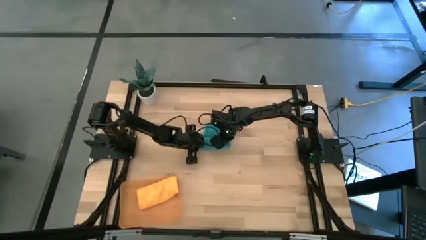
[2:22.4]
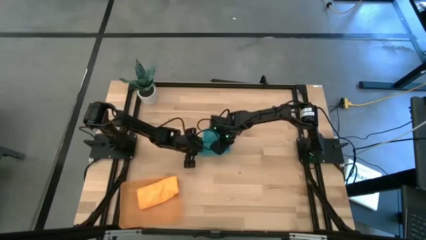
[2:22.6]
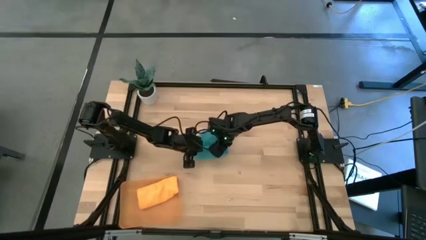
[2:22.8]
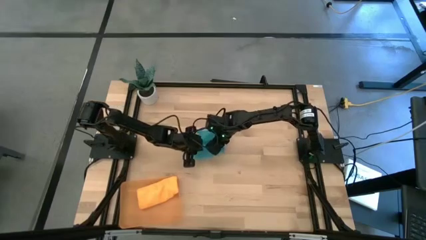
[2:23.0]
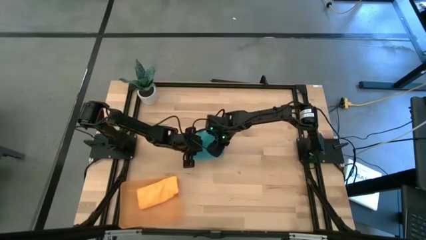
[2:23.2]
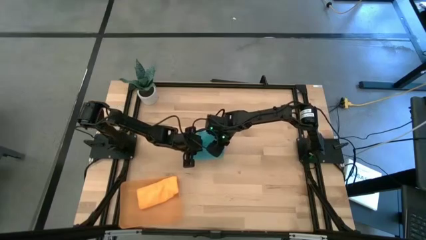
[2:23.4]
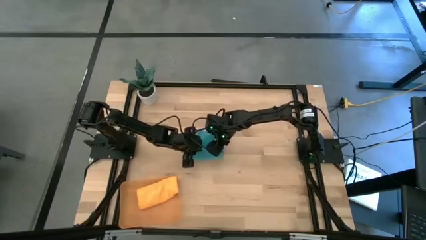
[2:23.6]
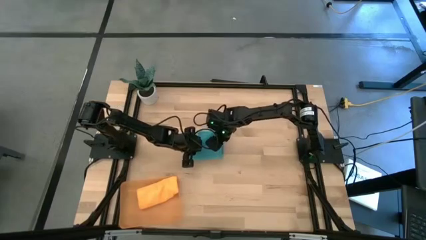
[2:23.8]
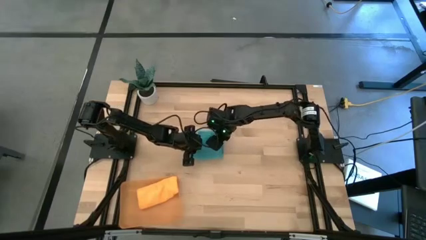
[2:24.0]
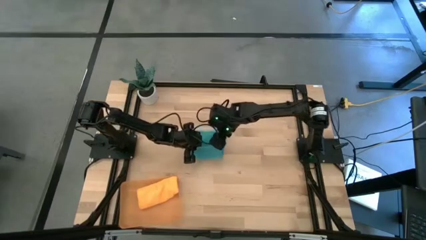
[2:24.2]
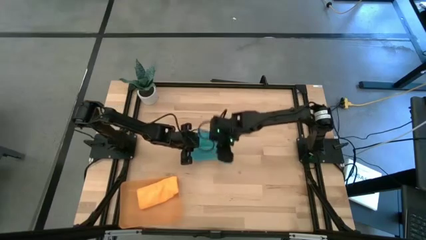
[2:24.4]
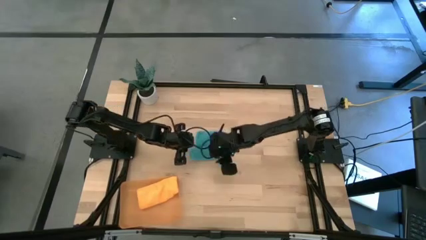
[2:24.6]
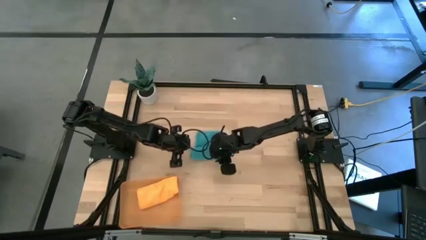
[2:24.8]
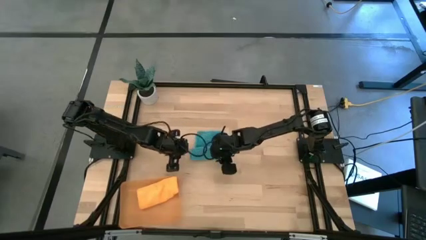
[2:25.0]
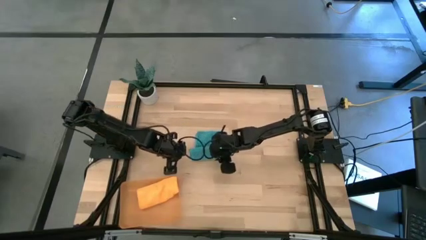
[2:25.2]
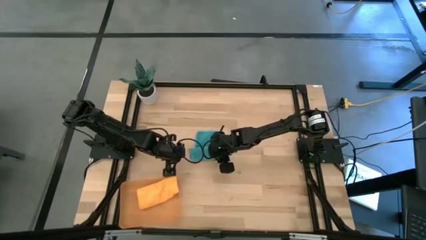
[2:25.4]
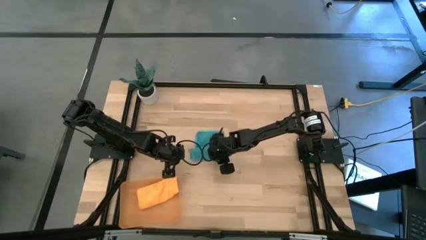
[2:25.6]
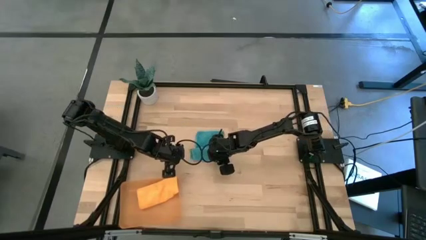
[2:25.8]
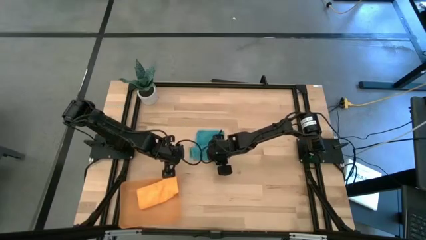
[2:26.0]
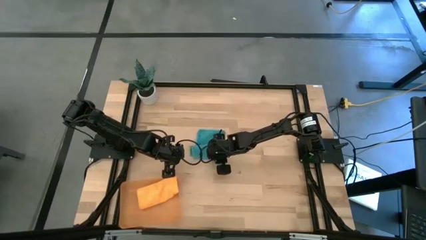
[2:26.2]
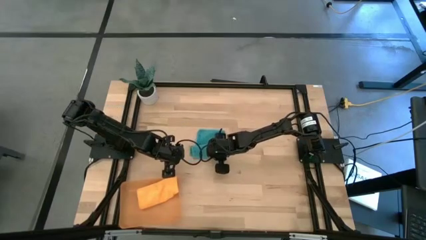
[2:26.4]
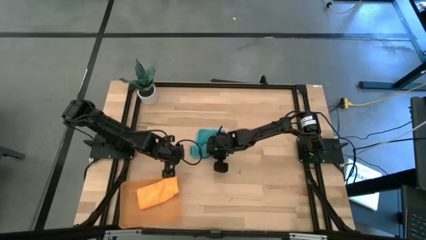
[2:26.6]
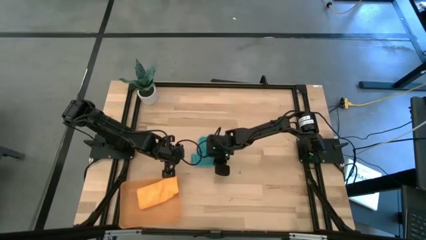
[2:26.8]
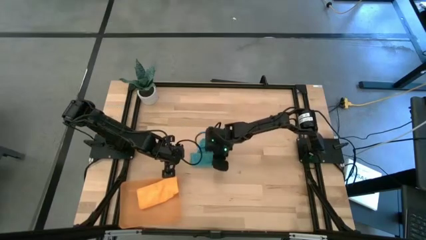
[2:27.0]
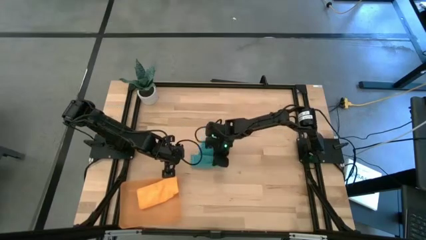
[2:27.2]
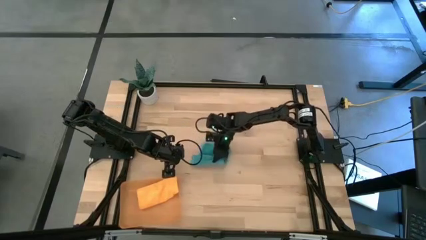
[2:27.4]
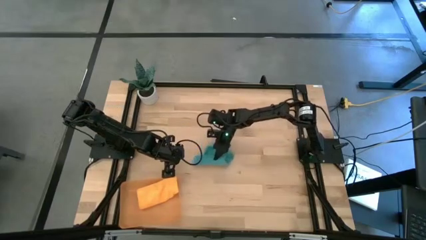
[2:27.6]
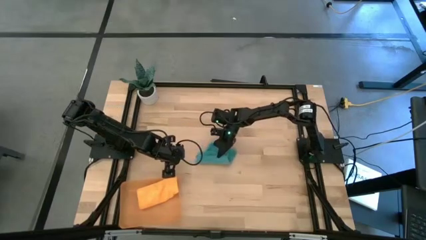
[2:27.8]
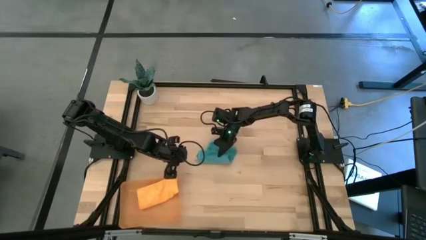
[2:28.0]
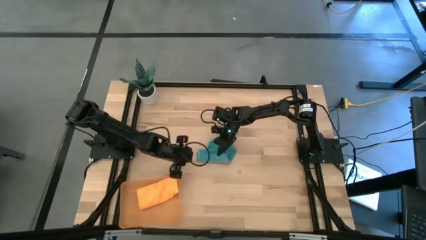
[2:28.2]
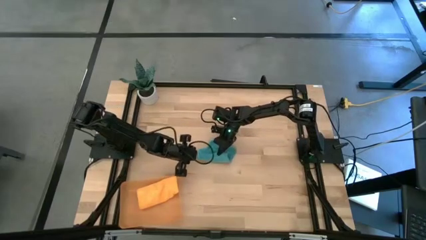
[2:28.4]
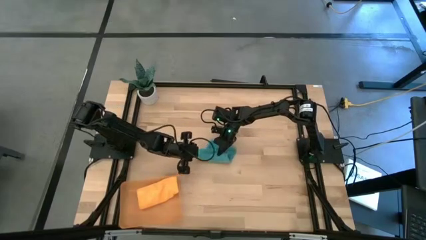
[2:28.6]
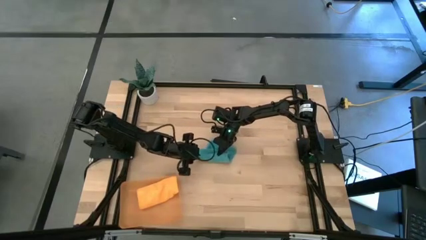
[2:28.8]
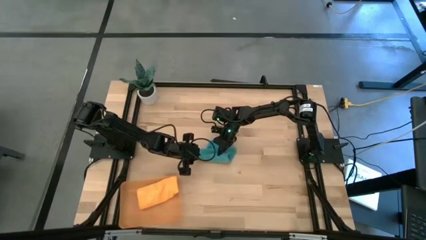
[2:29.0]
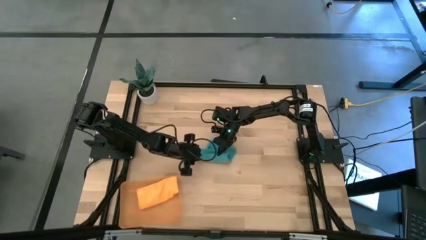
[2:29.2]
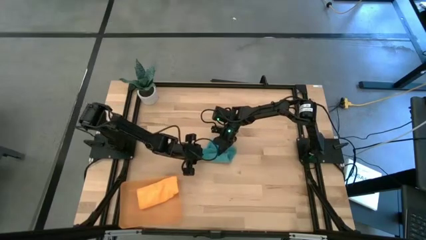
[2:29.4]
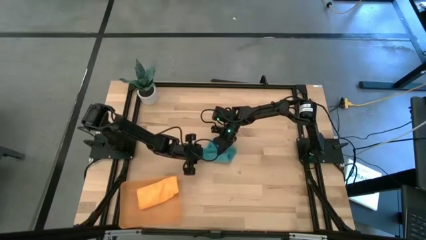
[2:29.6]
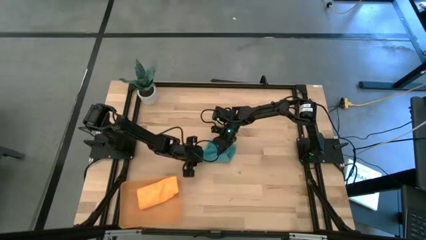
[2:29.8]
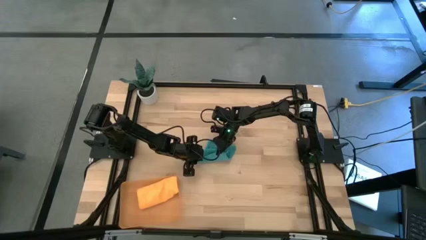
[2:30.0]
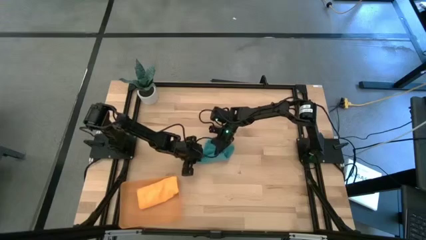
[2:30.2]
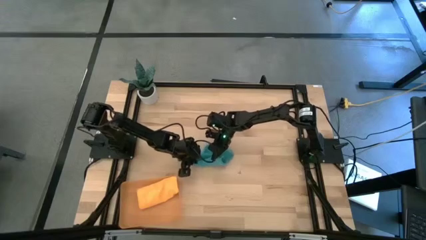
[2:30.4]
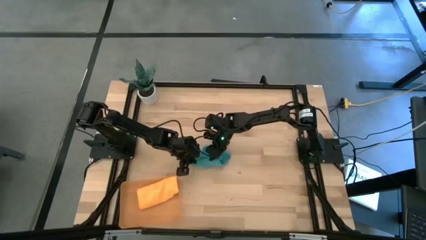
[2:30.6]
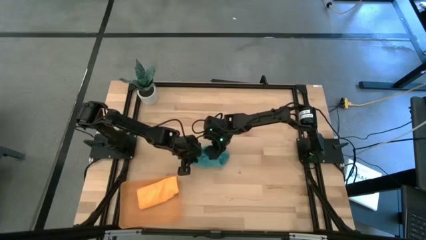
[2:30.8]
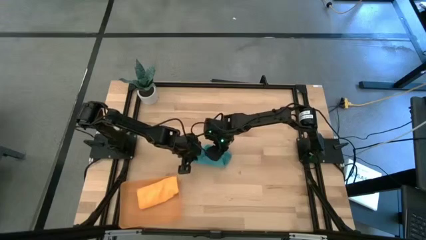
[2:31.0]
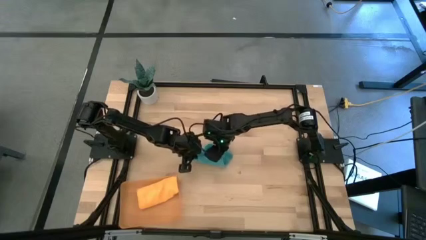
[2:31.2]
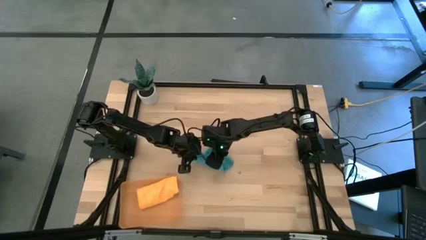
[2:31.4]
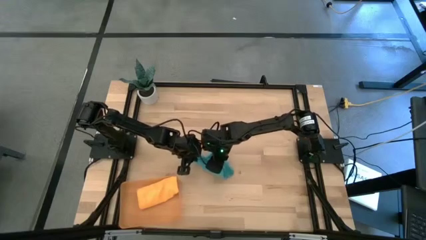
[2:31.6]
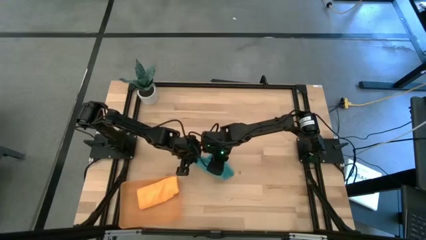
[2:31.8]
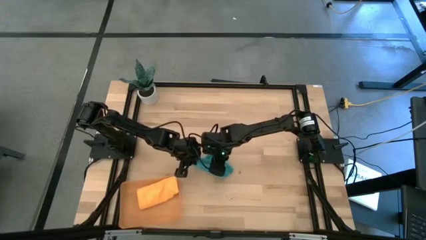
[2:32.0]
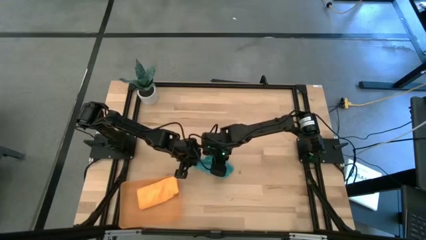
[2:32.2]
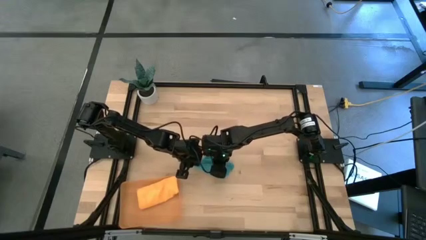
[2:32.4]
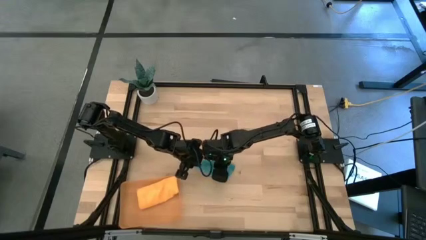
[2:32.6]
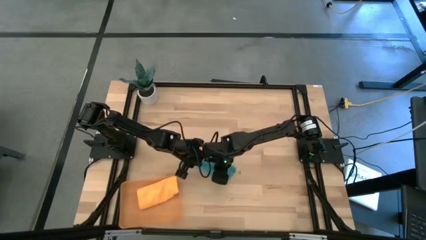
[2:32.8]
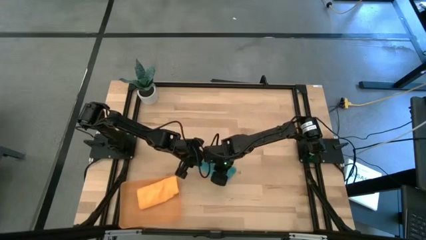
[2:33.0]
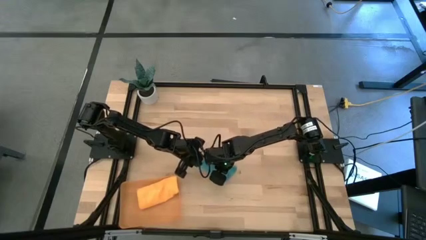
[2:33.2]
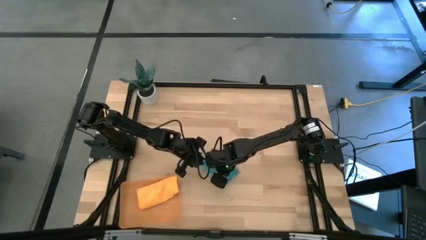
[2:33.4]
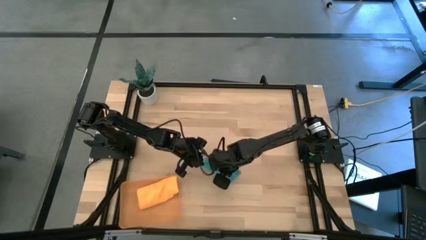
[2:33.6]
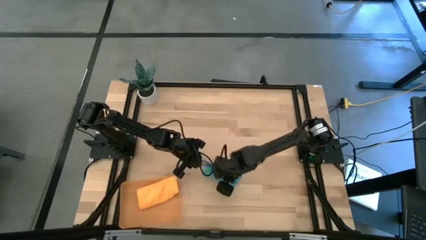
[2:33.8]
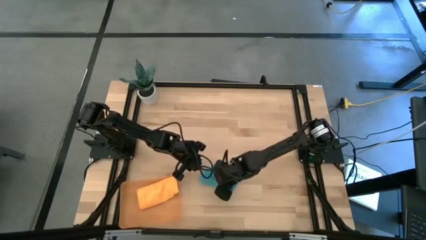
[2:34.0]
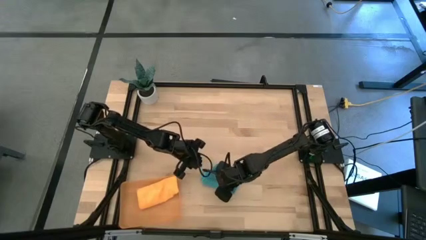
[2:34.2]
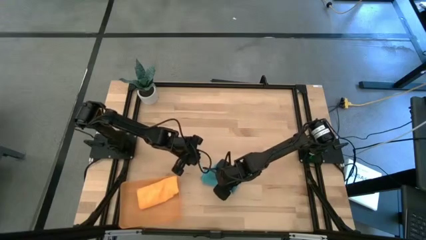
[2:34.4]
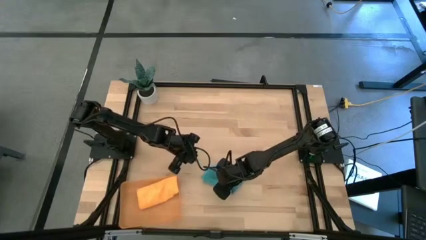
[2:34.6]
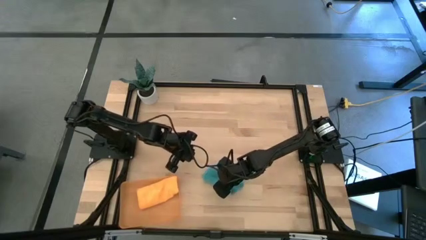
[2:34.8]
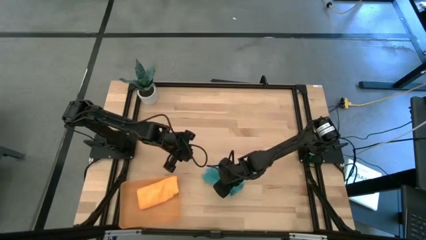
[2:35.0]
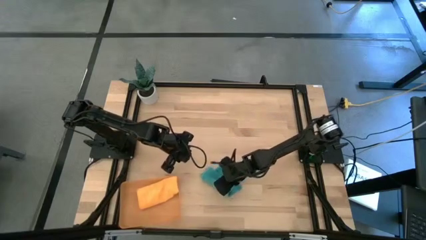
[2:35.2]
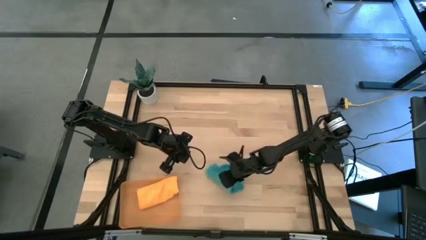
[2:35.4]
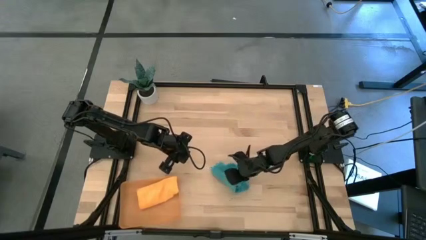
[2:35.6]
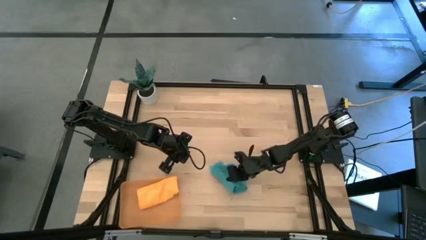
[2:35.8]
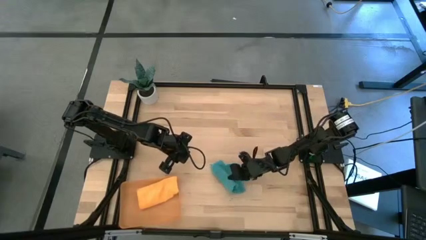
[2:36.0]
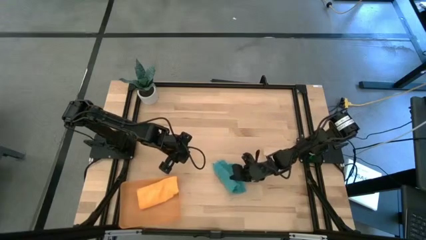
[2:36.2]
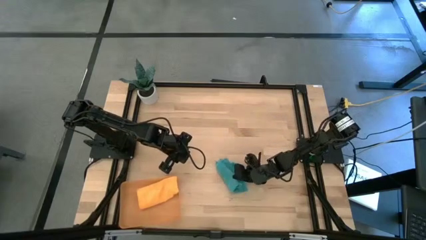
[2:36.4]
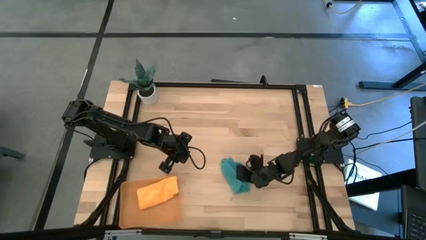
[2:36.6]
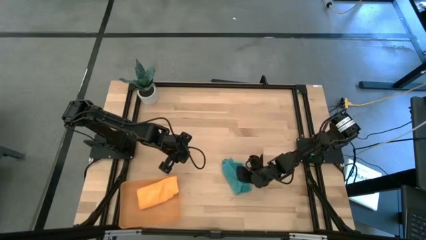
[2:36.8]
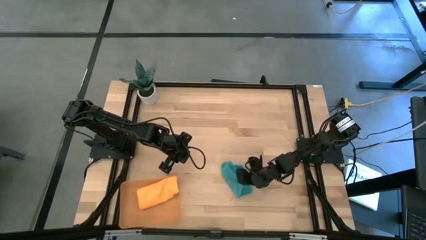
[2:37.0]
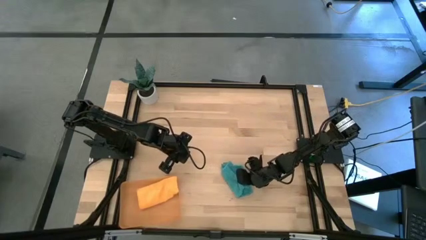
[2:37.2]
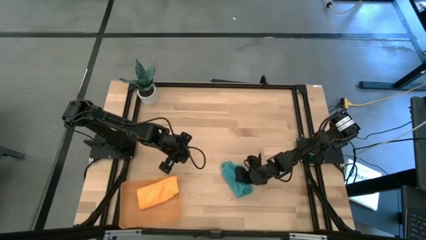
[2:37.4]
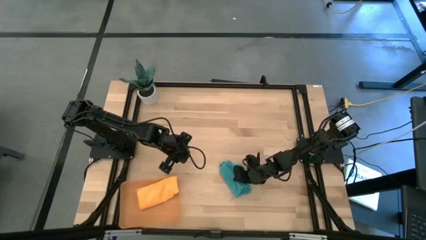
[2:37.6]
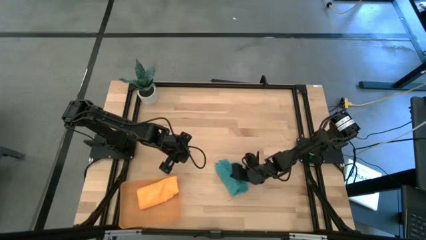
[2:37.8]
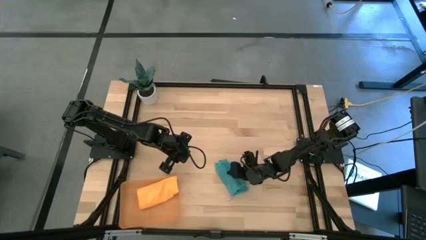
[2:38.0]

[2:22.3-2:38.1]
Task: Roll microfiber towels into tight, uniform cylinder then place into a basket
Roll the blue microfiber towel
